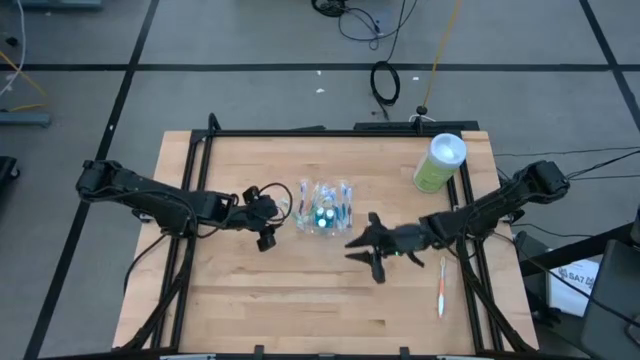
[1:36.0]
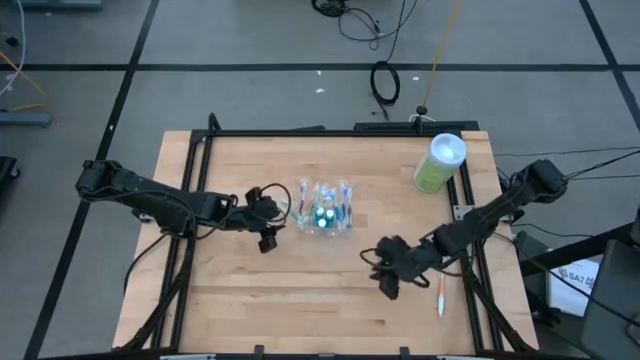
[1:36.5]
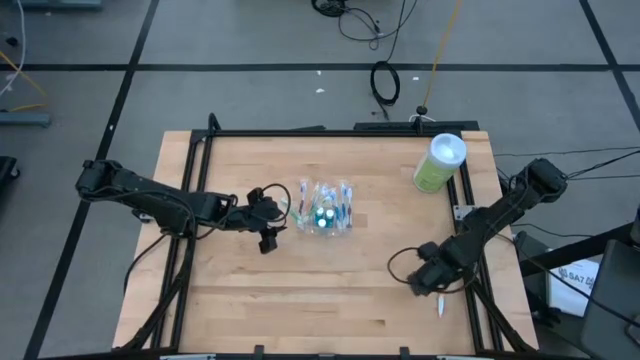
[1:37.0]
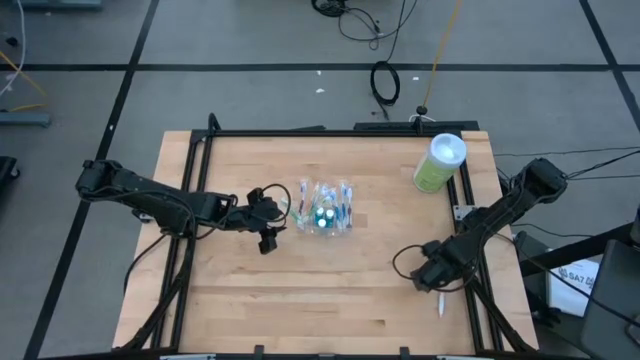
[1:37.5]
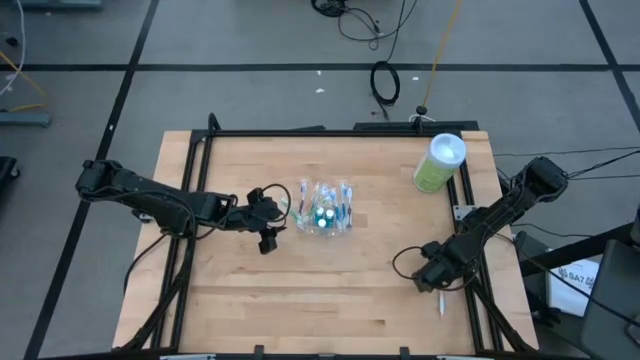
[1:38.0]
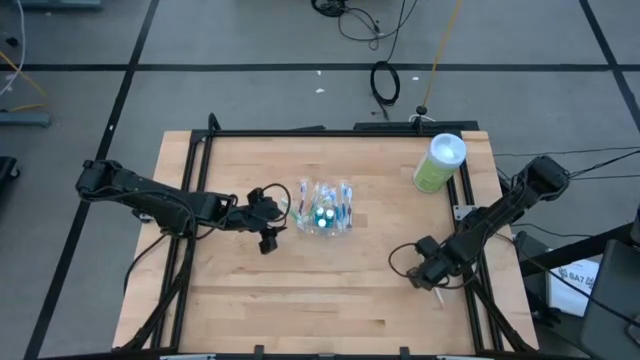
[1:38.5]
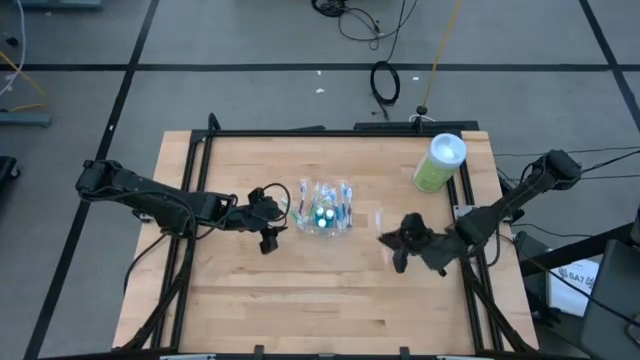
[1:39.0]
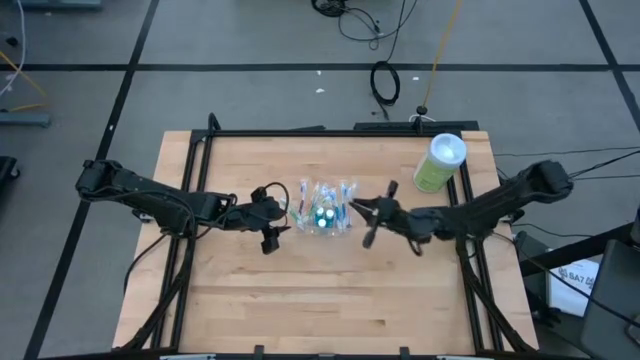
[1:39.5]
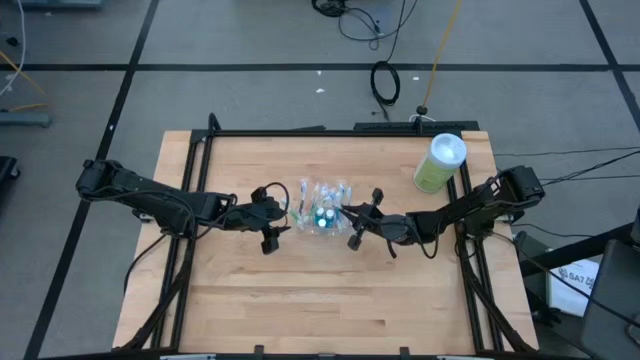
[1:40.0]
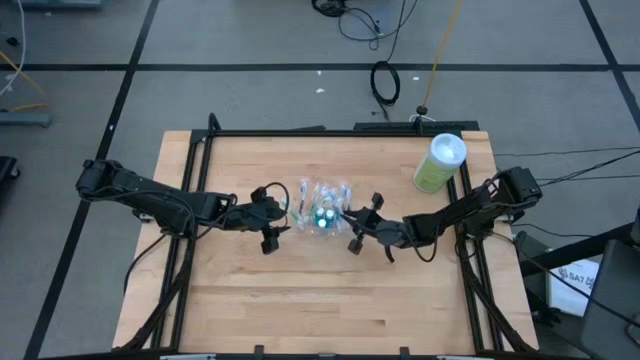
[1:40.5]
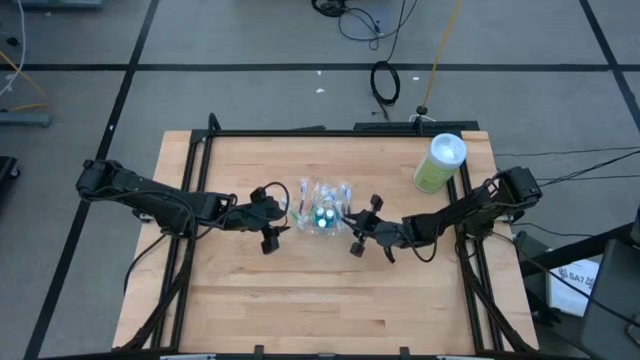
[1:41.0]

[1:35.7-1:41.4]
Task: Pick & Place toothbrushing station
Put the orange toothbrush into the transparent organizer

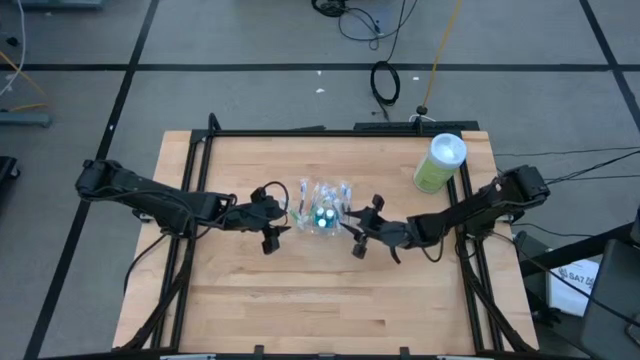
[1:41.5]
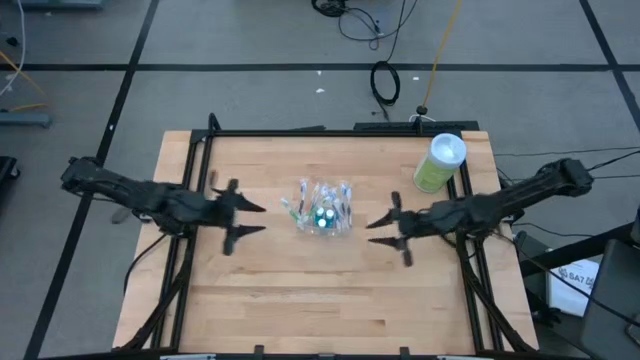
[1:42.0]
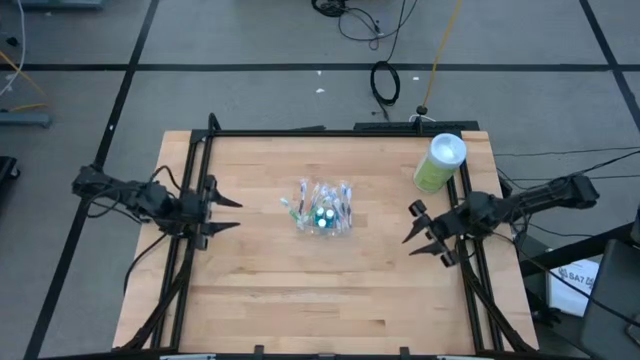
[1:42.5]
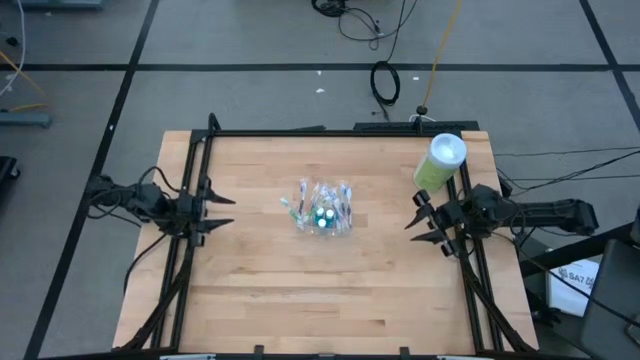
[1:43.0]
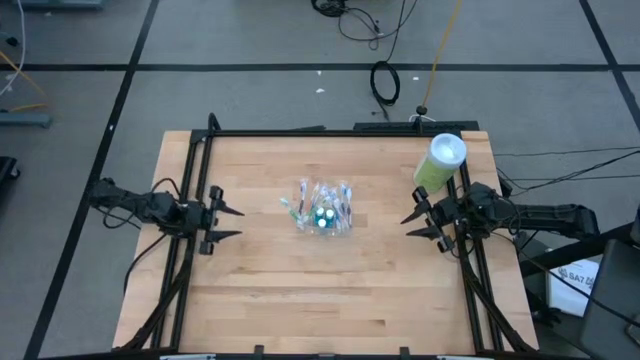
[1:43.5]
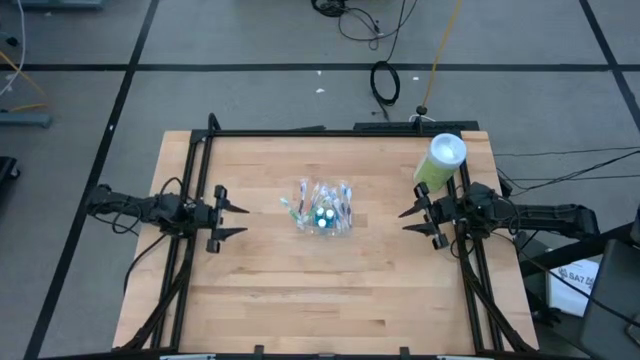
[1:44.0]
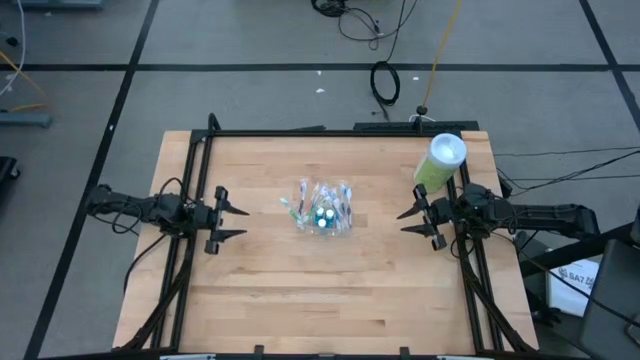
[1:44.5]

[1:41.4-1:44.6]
Return to Home Position

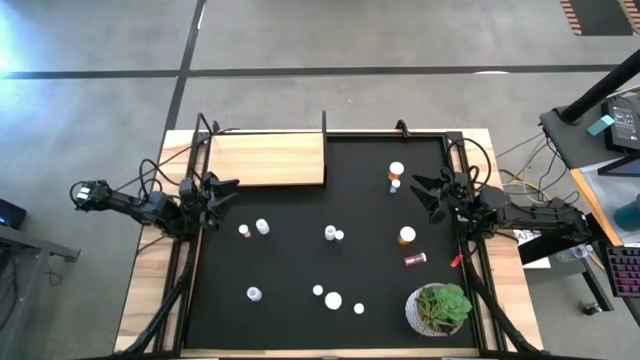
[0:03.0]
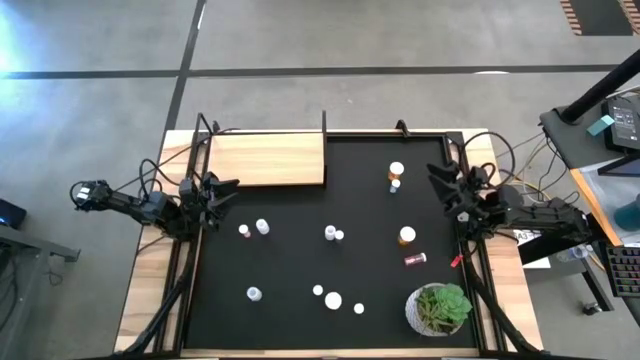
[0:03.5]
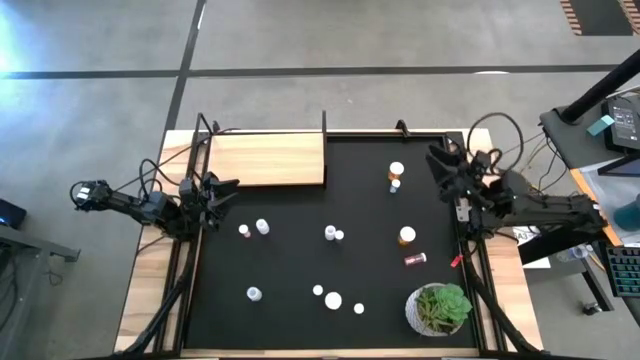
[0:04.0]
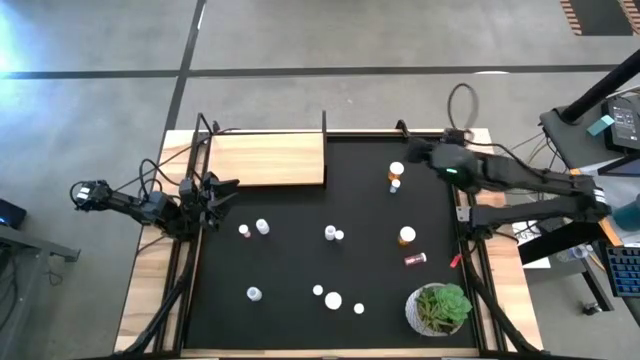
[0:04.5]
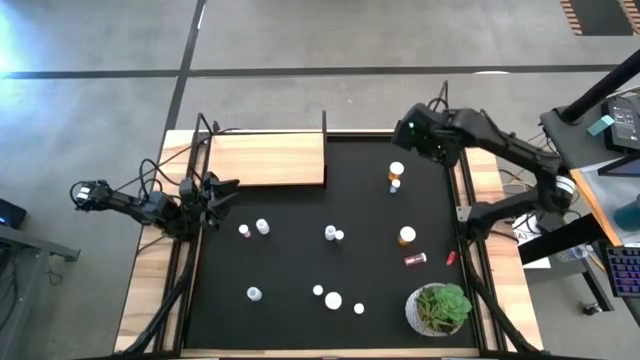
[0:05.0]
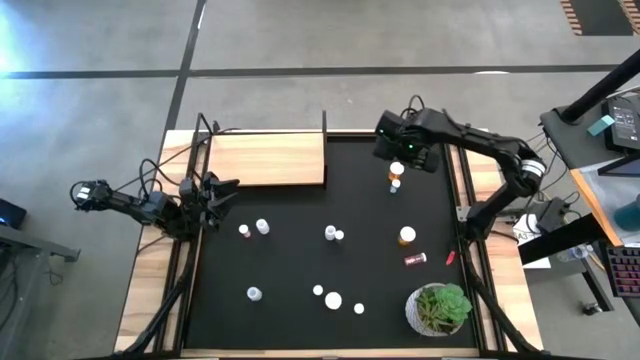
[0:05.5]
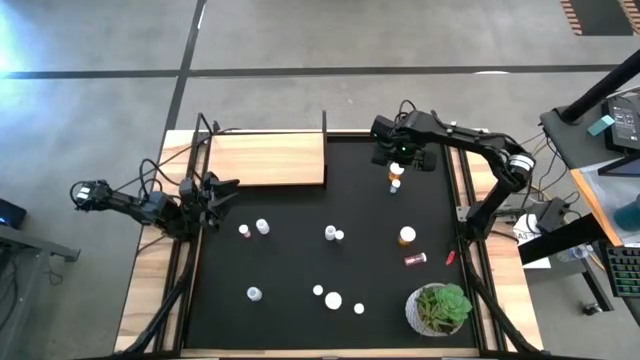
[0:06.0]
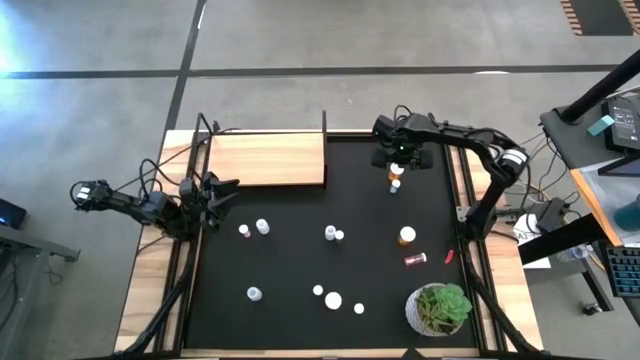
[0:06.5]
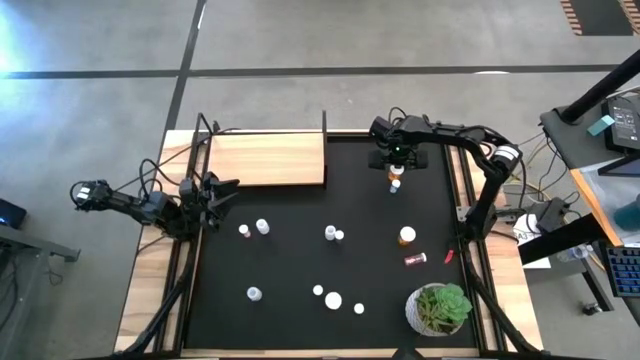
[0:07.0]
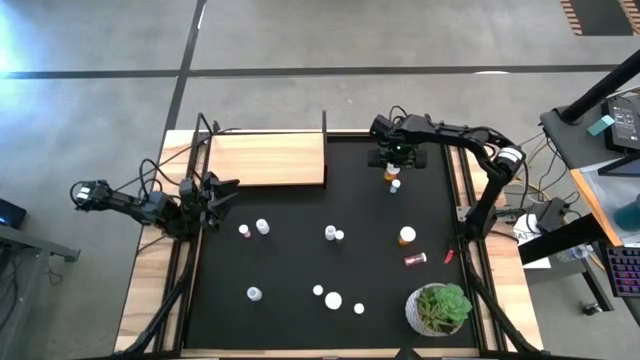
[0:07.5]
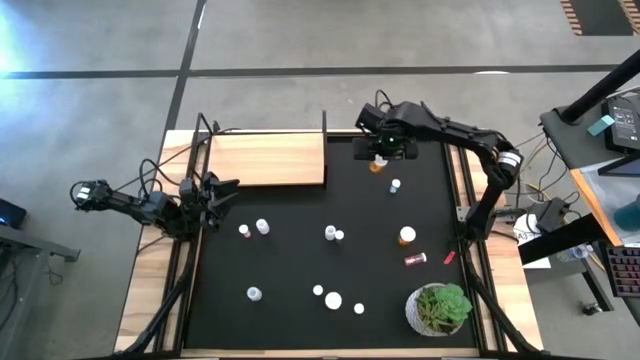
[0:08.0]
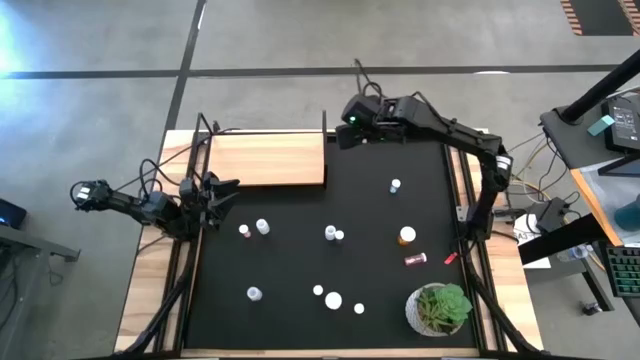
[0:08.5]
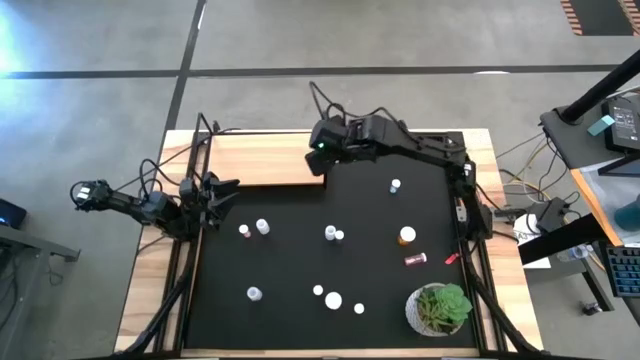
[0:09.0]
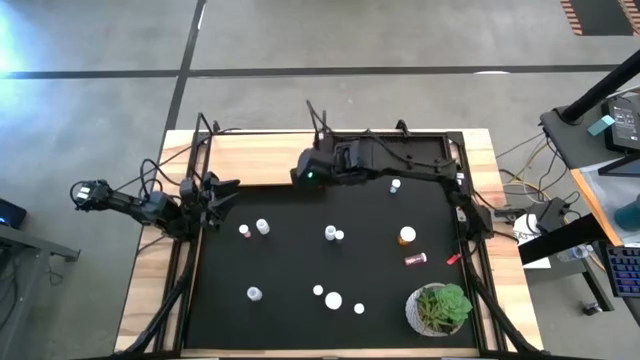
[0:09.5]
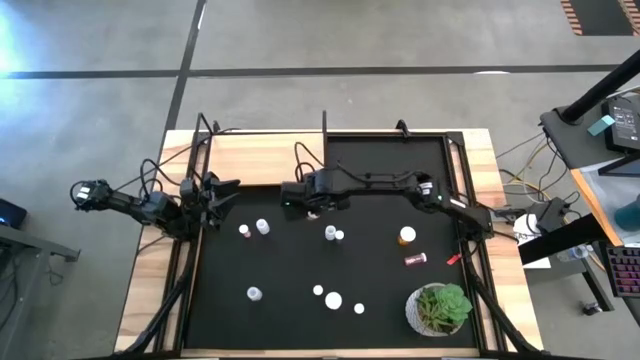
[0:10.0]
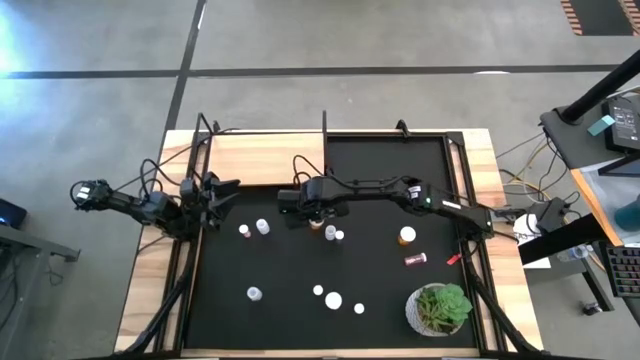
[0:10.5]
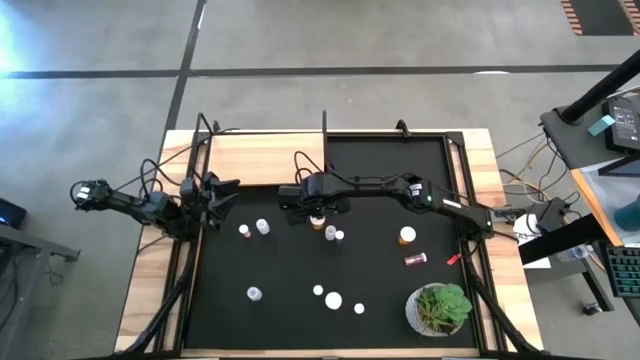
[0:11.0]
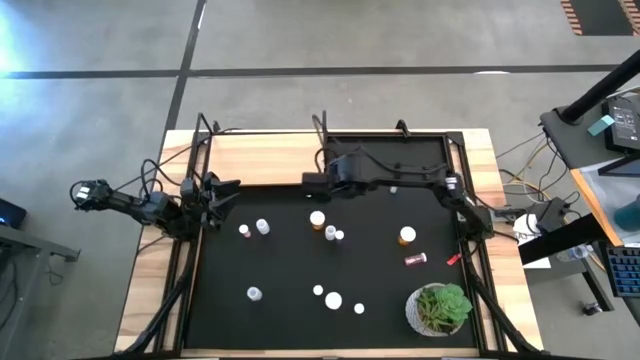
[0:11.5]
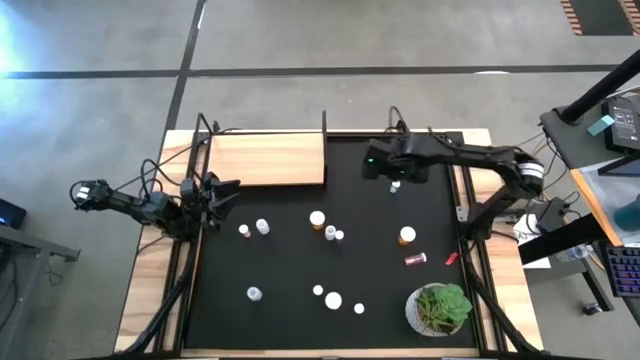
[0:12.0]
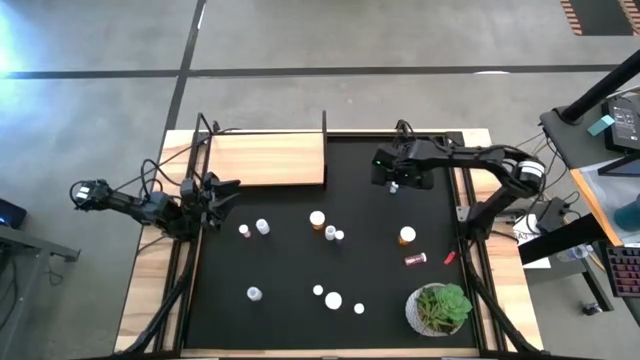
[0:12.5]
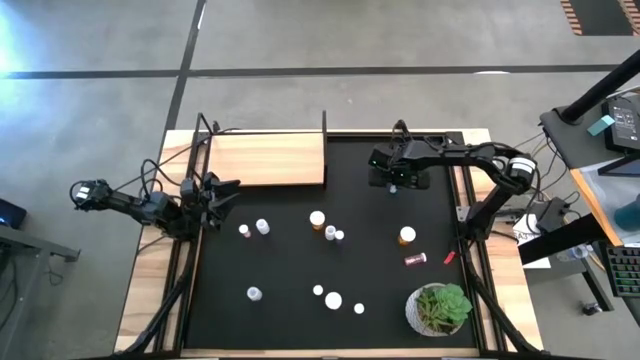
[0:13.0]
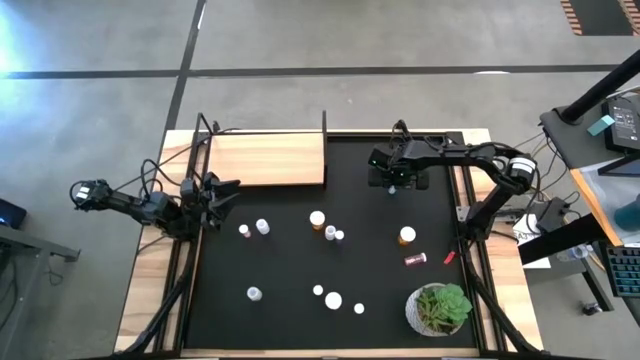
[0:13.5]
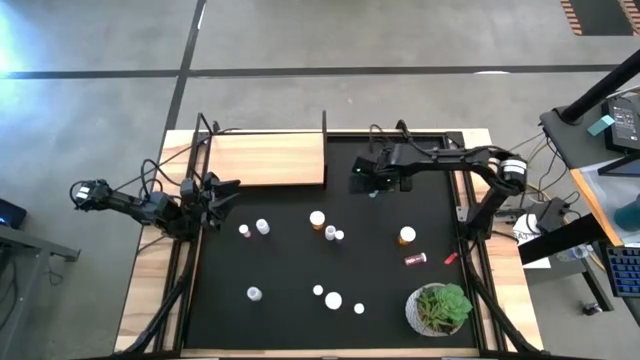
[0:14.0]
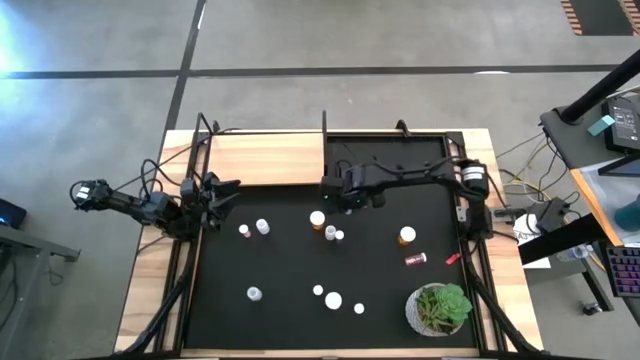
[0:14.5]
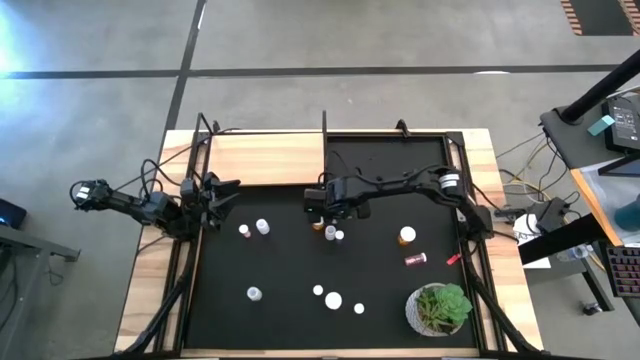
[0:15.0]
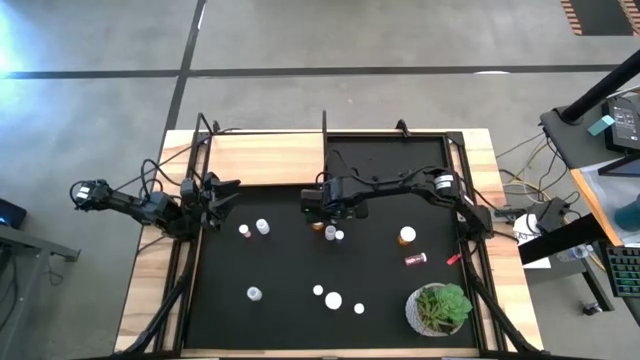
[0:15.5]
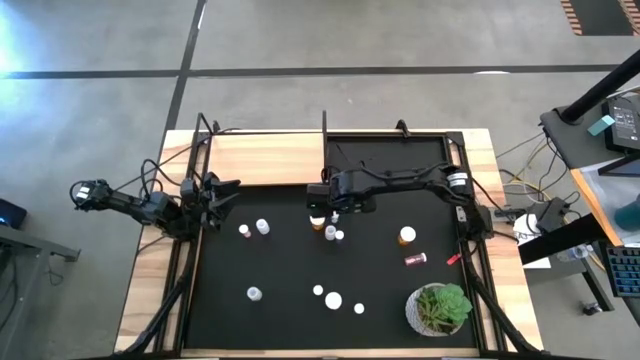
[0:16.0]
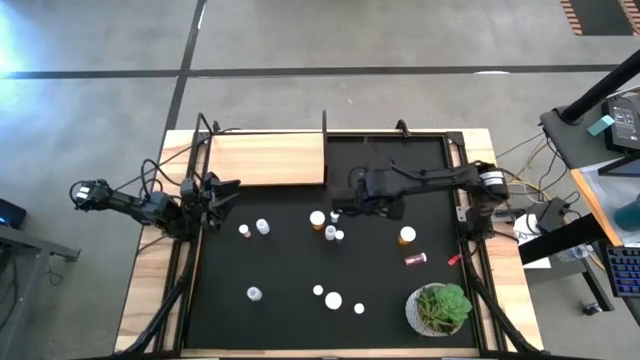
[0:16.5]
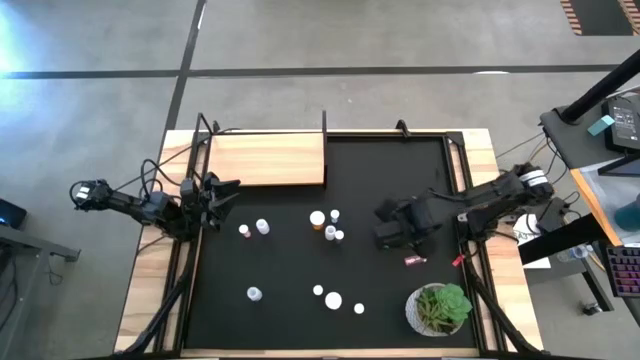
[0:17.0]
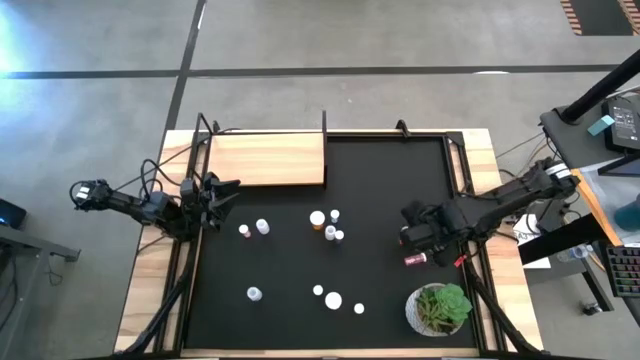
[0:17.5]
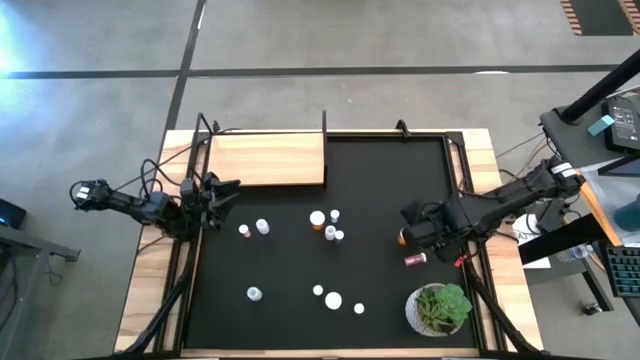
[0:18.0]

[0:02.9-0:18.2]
Task: Pick and place medicine bottles onto shelf by color
Prepare the pill bottles in the center of the table
